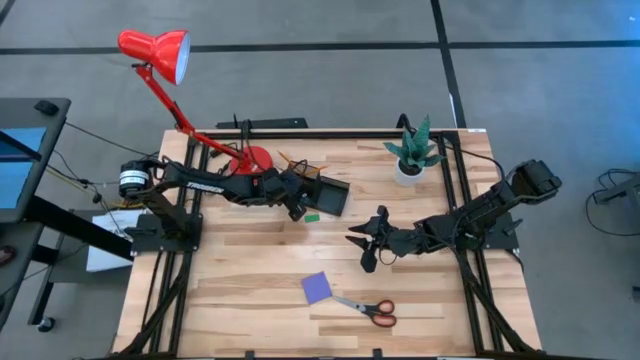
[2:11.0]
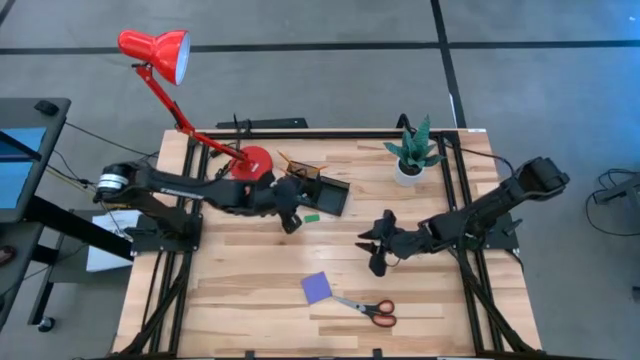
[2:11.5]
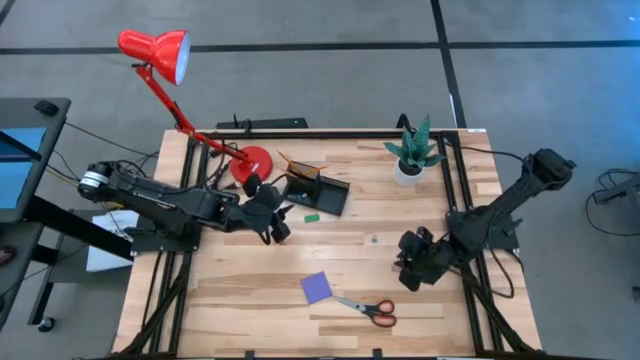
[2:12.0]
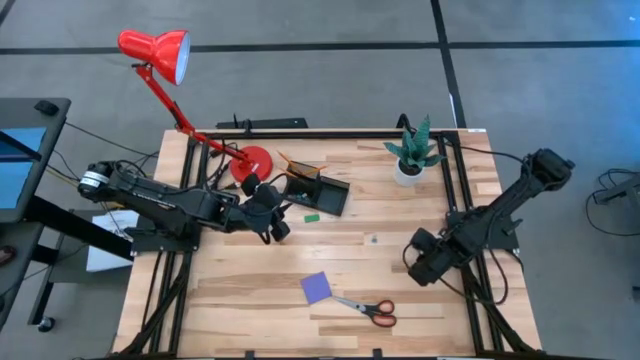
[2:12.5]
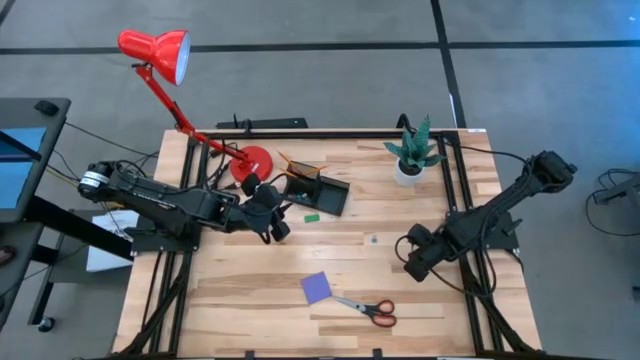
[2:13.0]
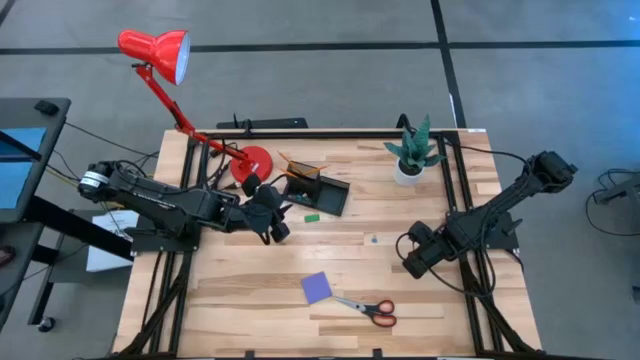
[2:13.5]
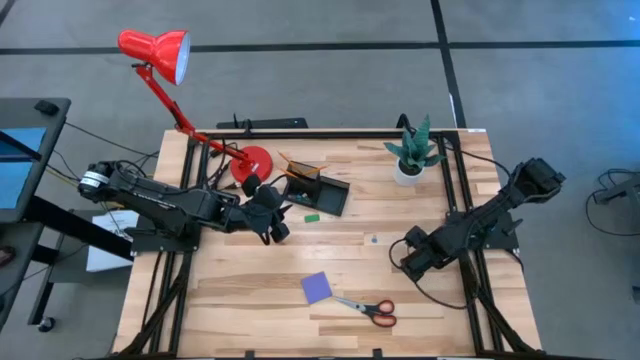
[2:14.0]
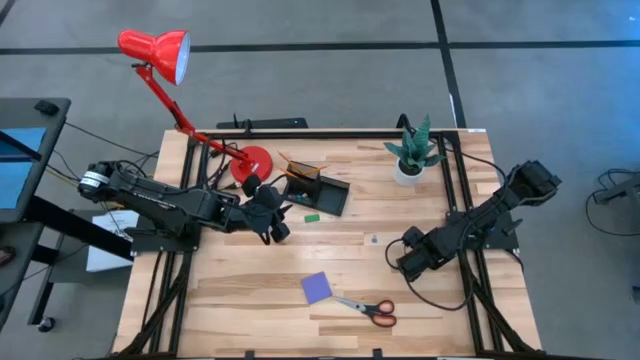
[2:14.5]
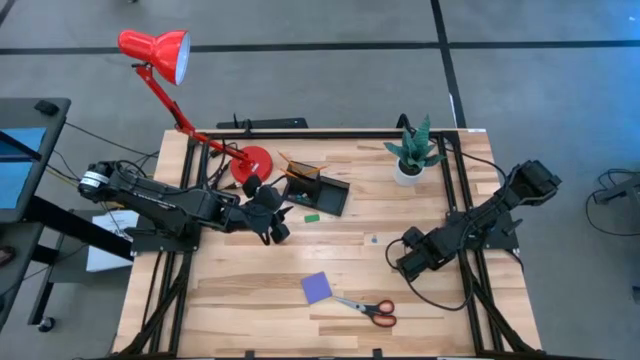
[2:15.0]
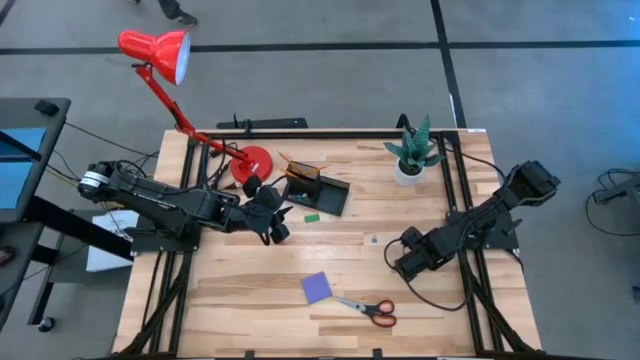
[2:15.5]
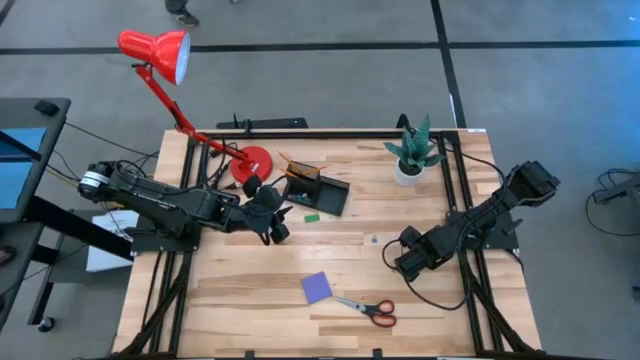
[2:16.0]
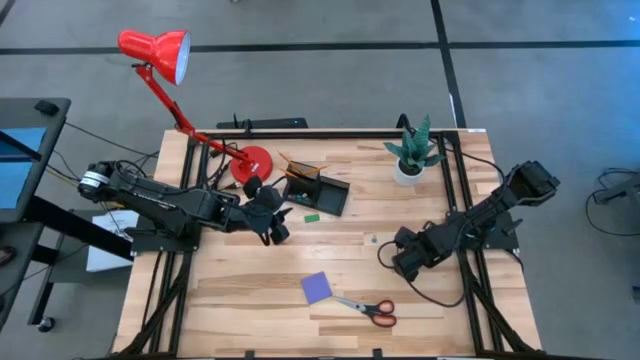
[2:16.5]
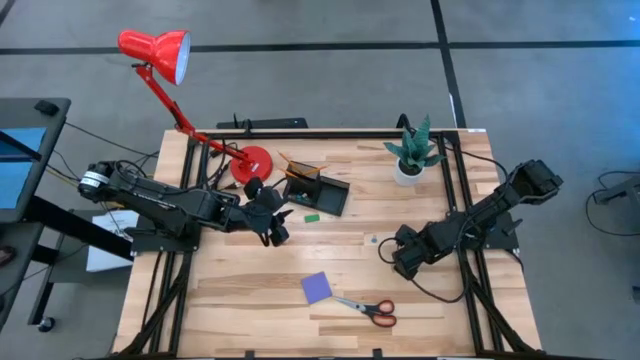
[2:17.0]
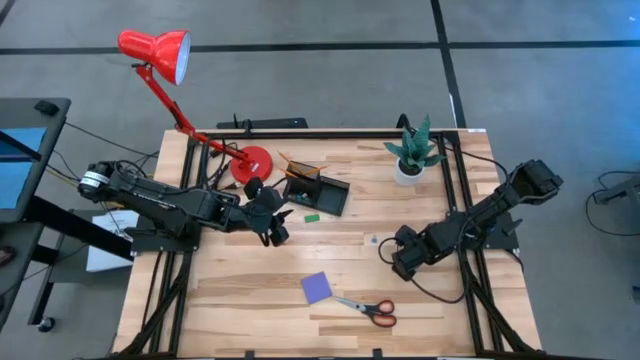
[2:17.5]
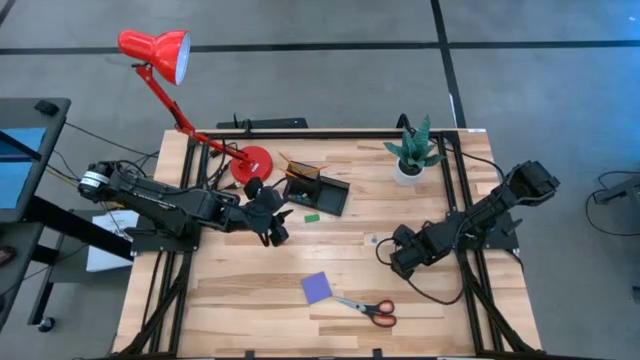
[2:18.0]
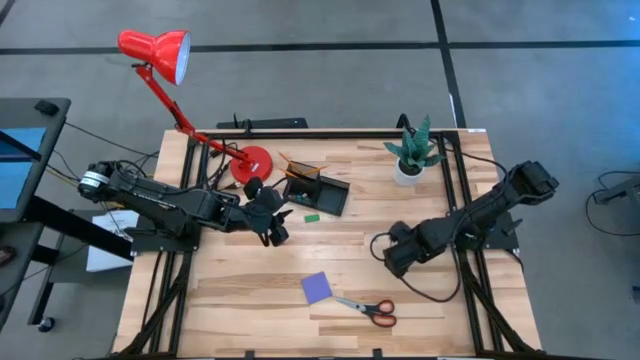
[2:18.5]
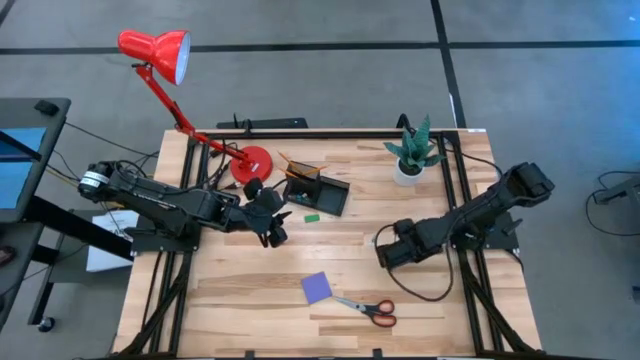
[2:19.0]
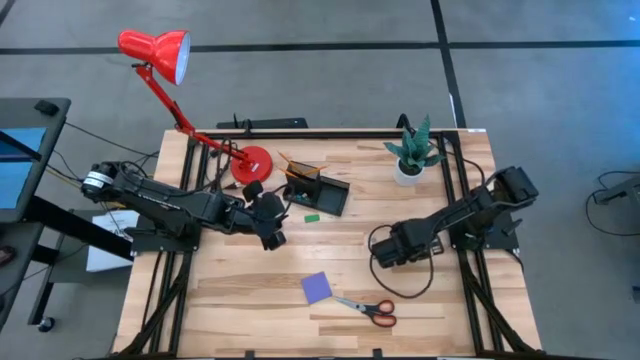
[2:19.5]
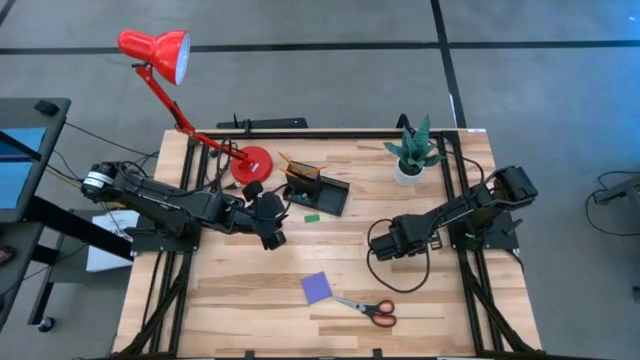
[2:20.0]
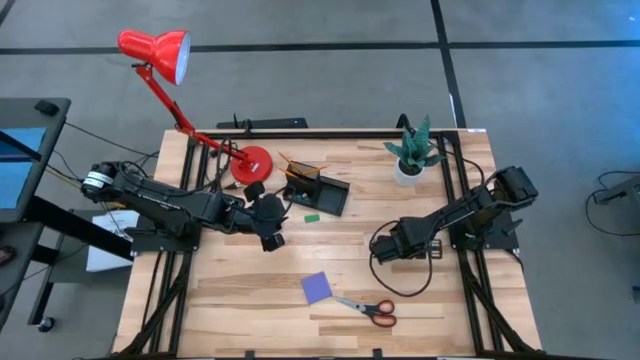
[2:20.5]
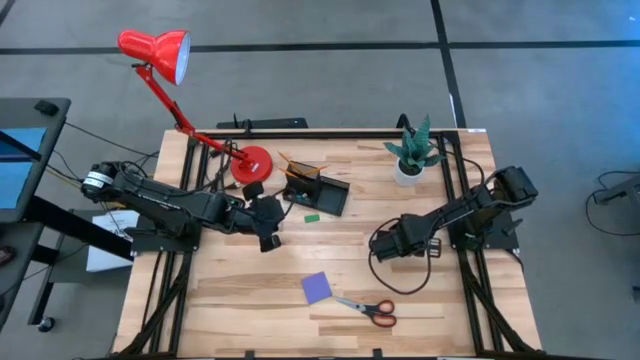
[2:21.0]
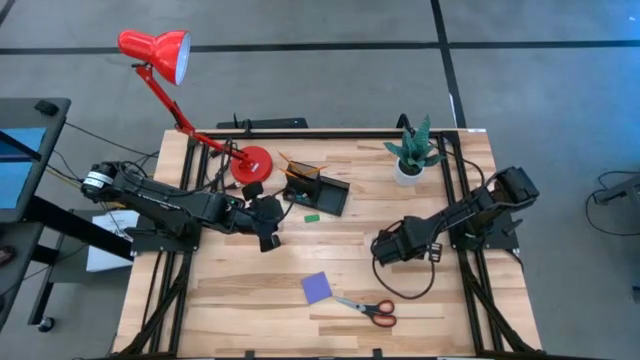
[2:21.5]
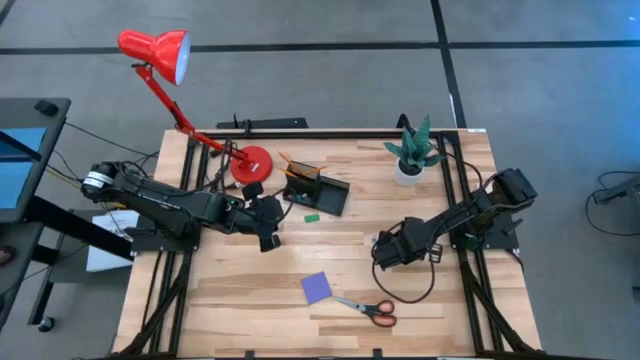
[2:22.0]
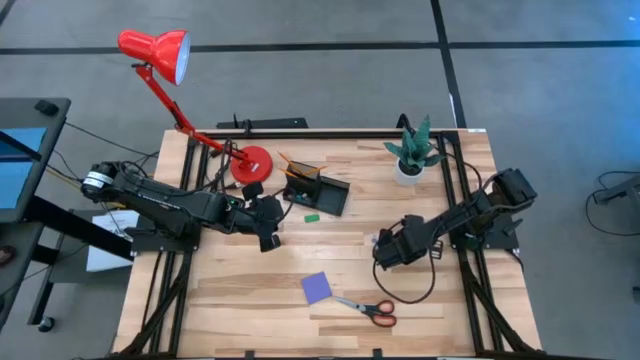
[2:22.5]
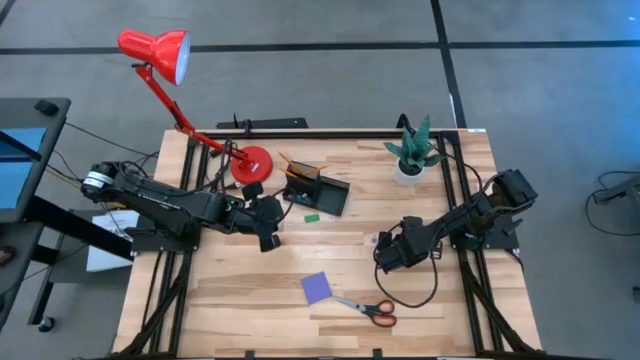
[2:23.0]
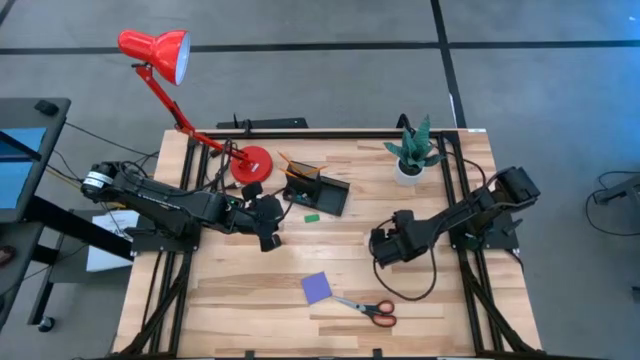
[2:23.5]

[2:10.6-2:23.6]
Task: Pick and place office supplies into organizer
Put the yellow binder clip into the black desk organizer

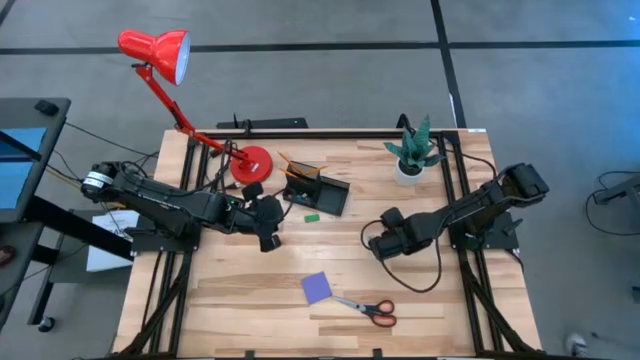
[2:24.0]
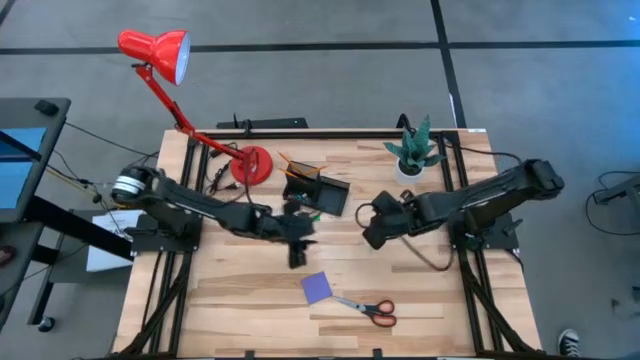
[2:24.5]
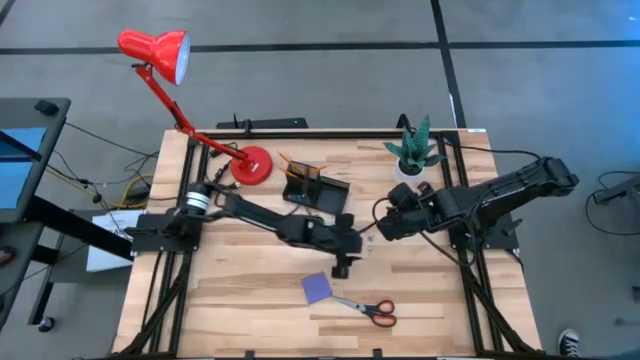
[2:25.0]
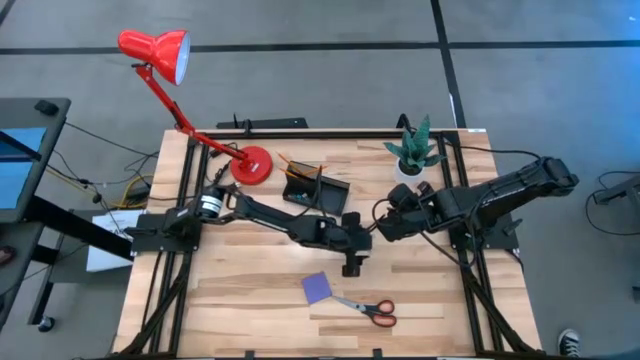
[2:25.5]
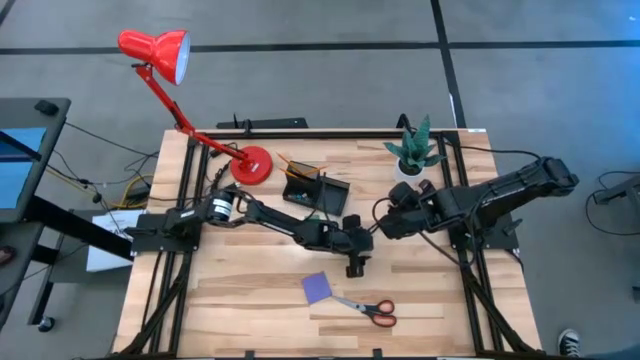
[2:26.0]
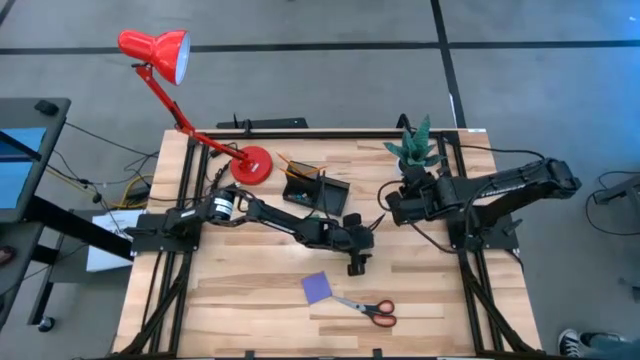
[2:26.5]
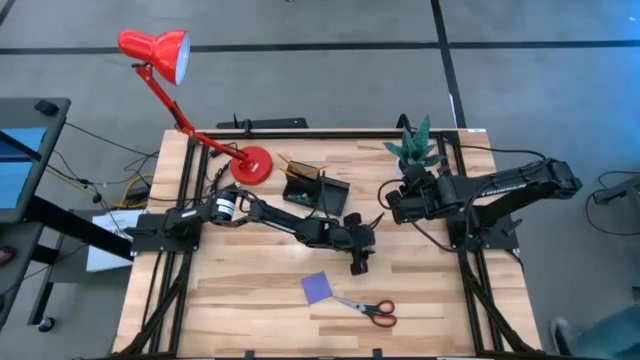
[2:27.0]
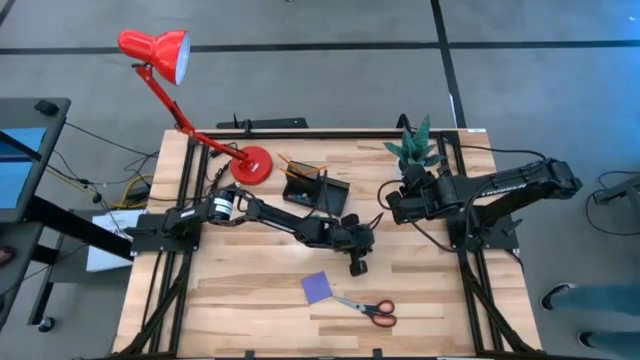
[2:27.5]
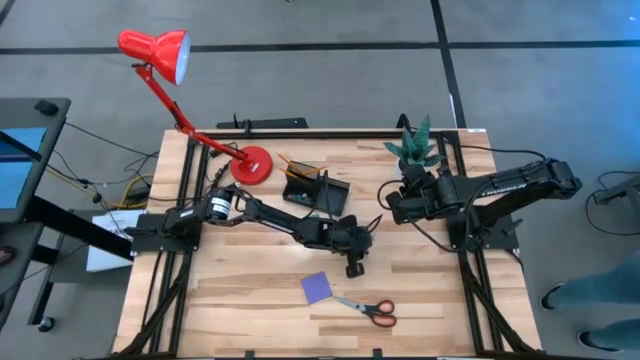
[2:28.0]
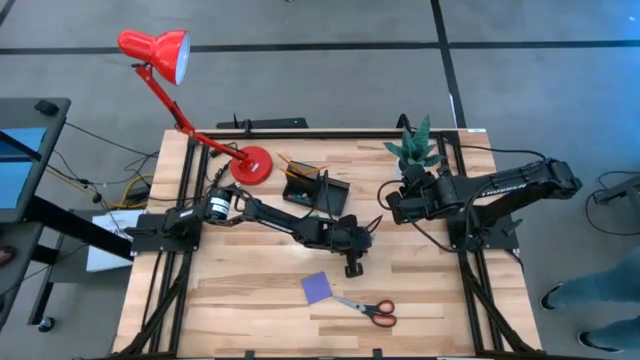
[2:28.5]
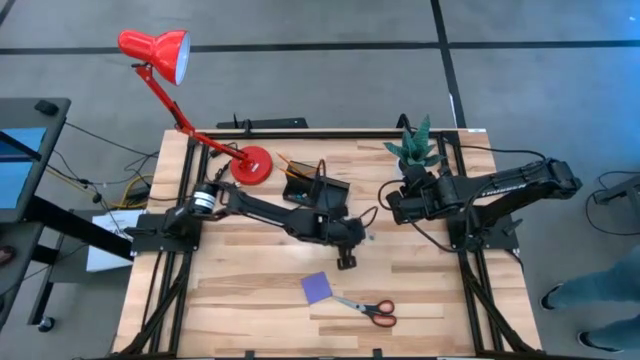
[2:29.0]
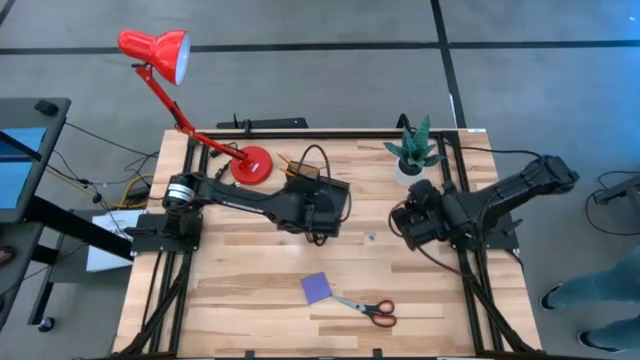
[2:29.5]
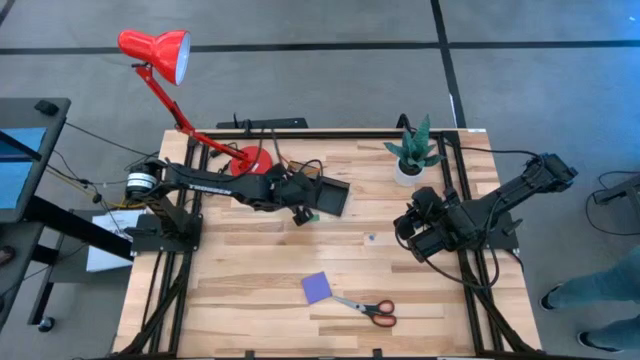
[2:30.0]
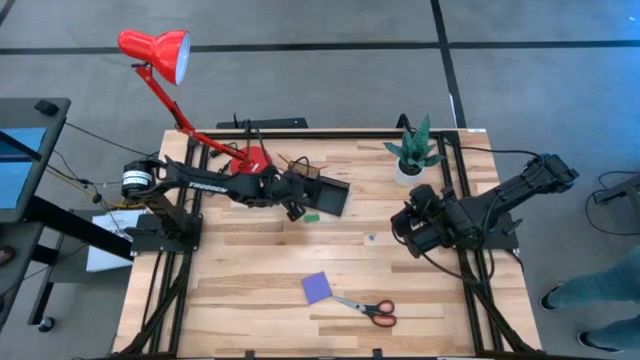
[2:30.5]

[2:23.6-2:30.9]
Put the yellow binder clip into the black desk organizer
